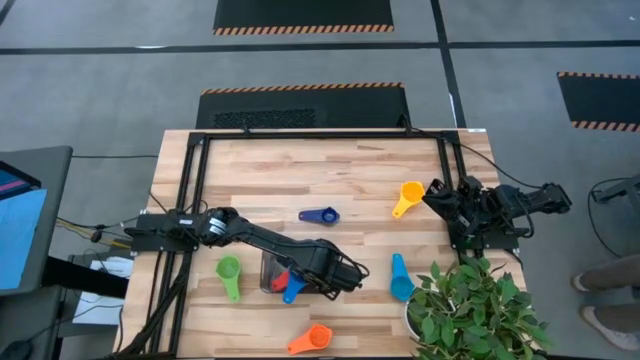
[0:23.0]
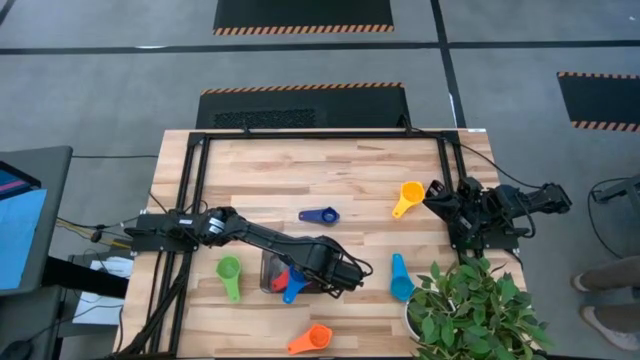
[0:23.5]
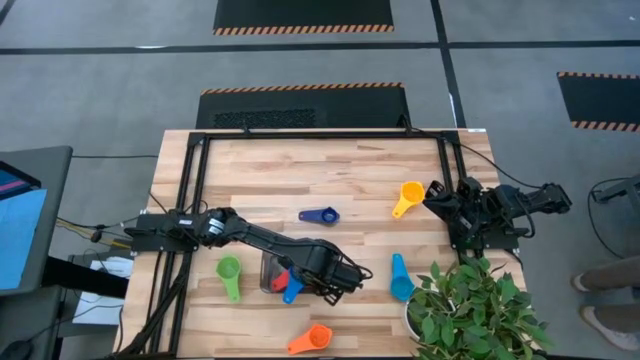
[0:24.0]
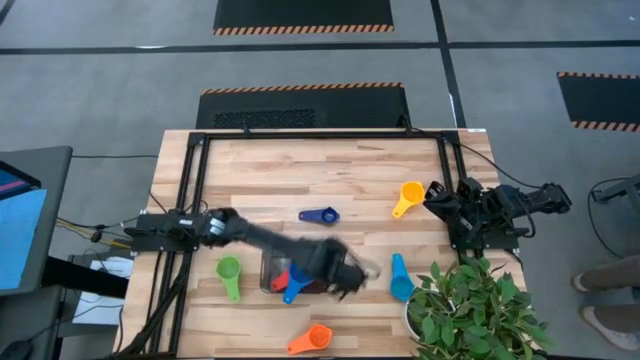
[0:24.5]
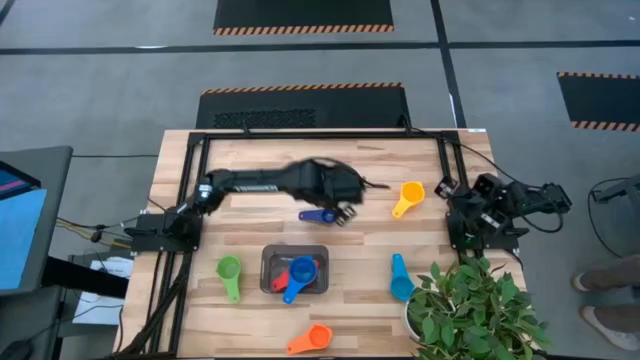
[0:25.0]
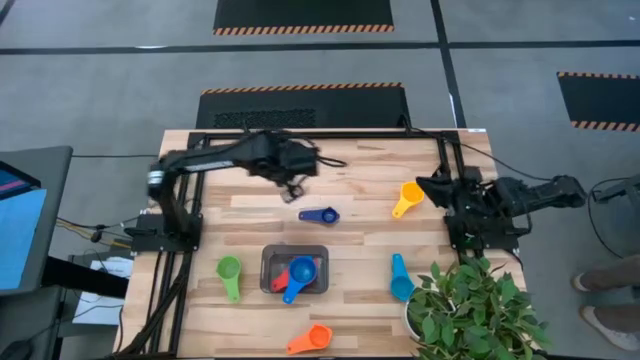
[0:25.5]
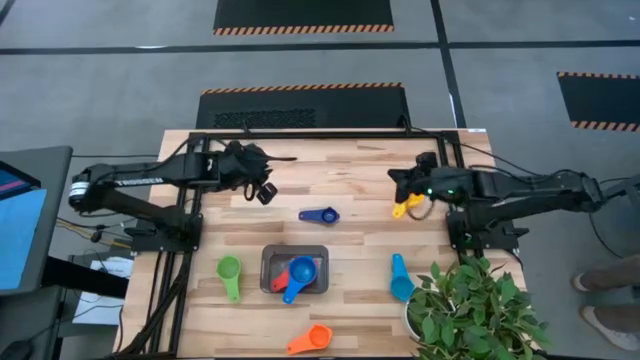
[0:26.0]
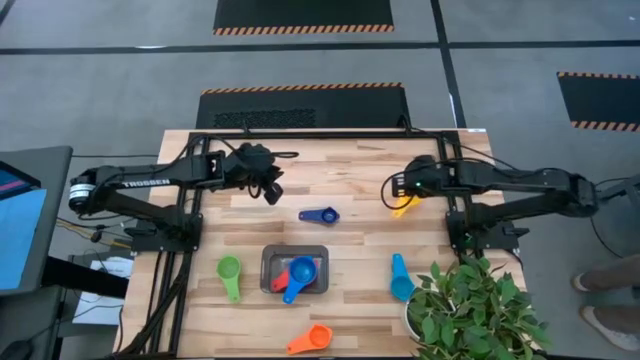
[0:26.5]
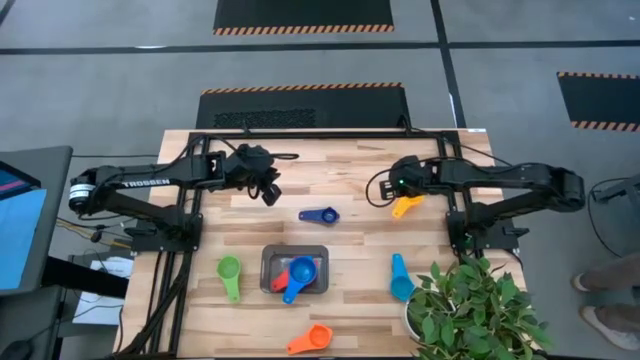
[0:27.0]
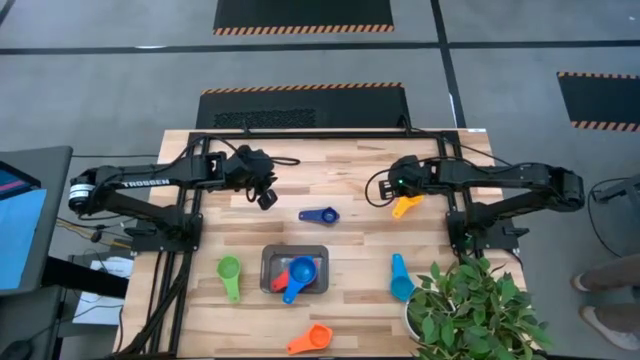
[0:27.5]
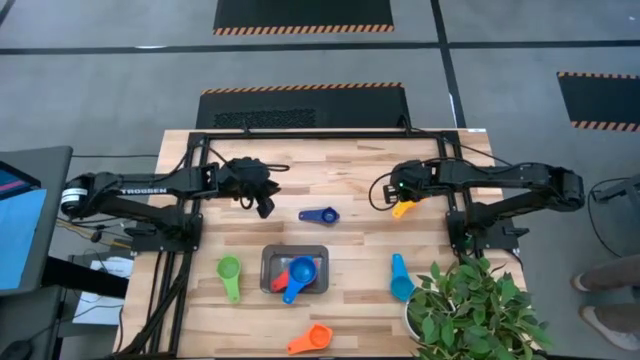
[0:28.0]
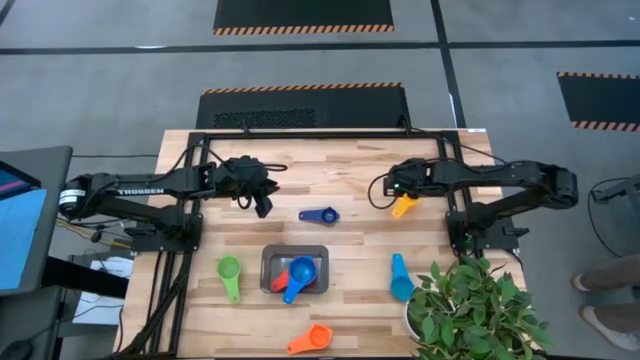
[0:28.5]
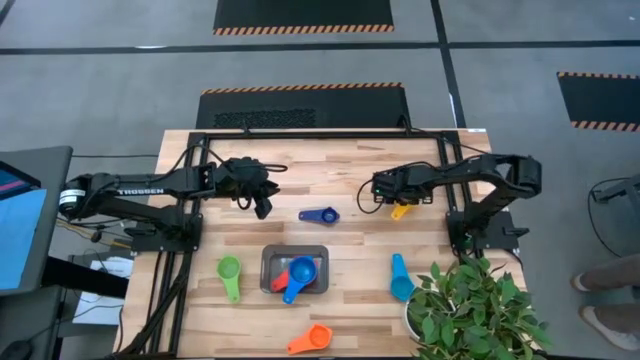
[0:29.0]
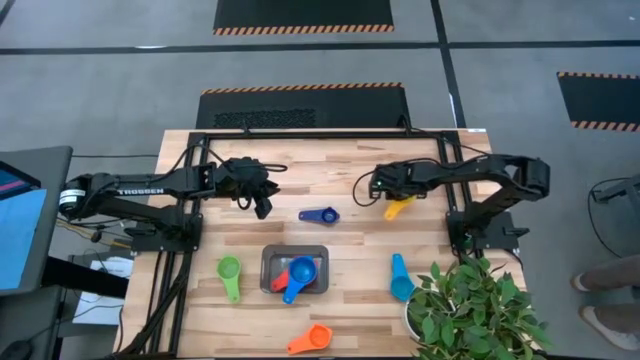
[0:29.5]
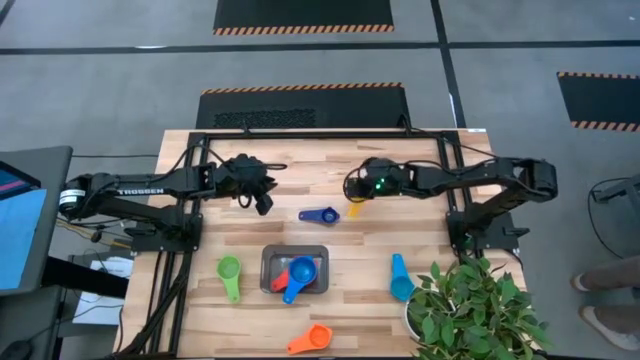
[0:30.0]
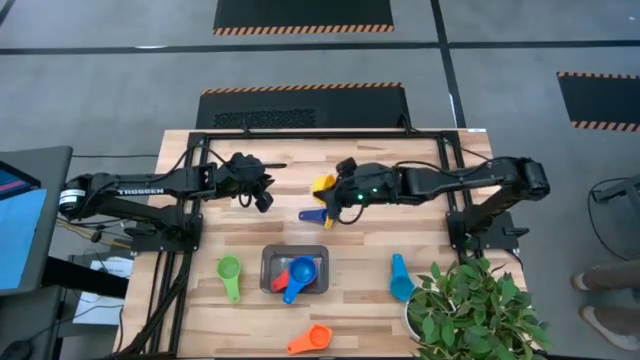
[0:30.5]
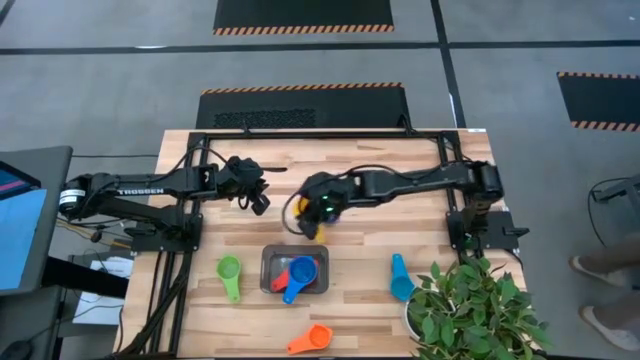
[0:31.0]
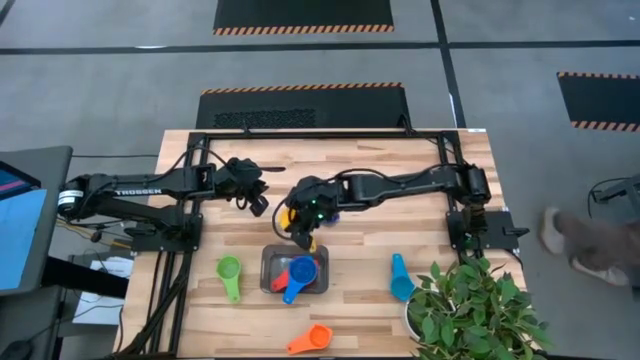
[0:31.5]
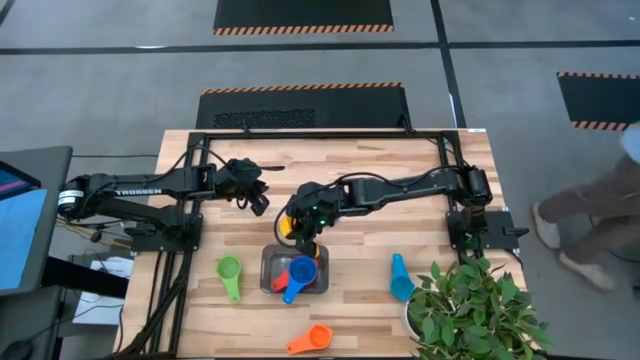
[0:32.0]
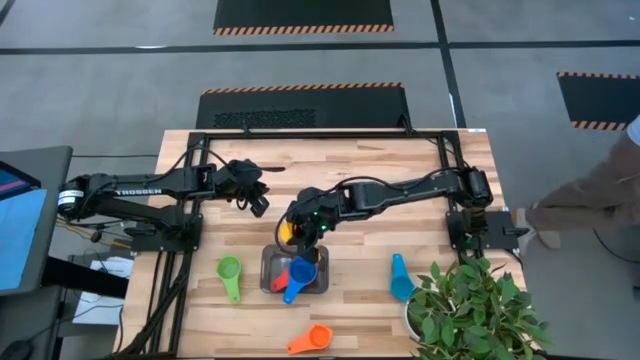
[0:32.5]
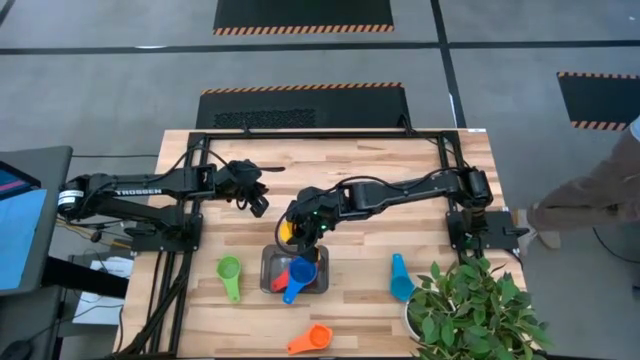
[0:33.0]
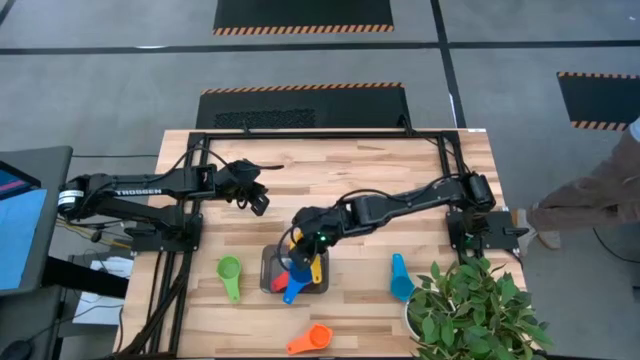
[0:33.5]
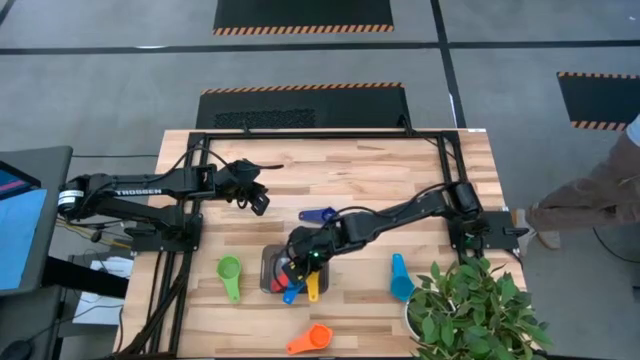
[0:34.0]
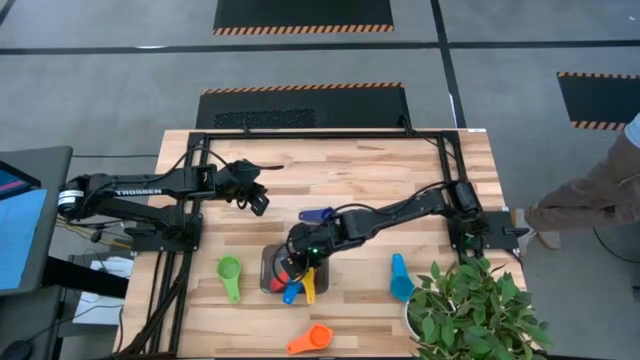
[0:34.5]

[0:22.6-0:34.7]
Task: Nest measuring cups in basket
Stack the yellow measuring cup on top of the blue measuring cup in the bin

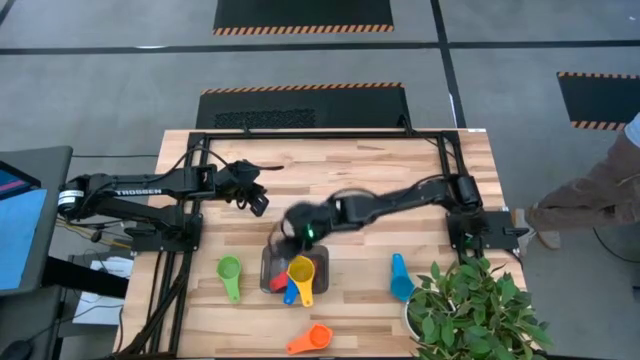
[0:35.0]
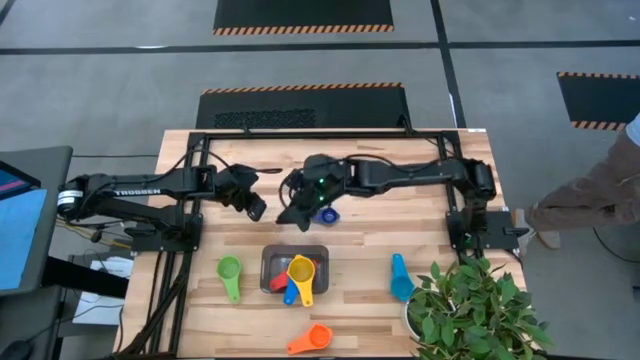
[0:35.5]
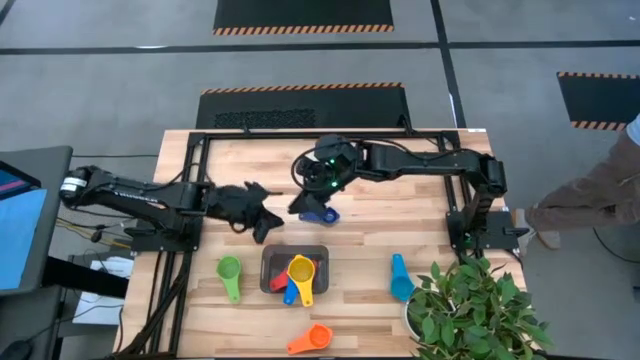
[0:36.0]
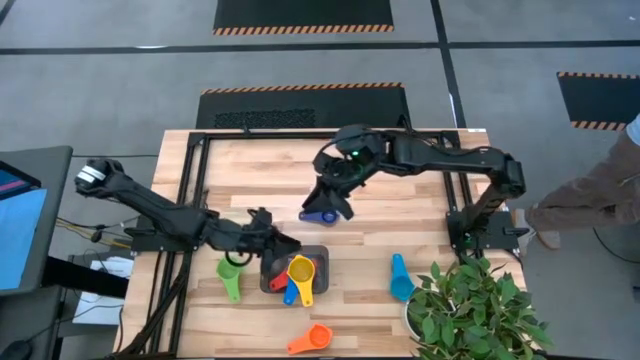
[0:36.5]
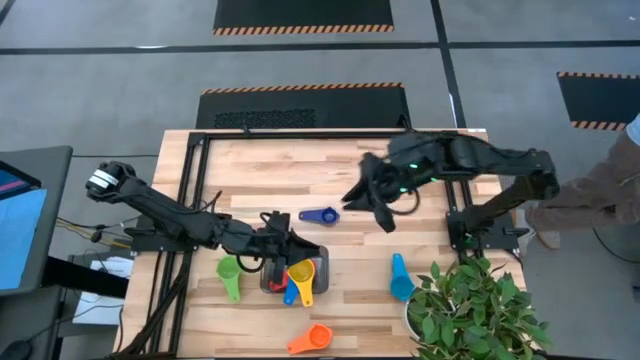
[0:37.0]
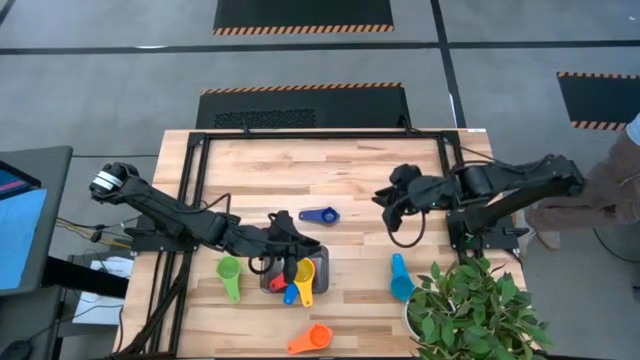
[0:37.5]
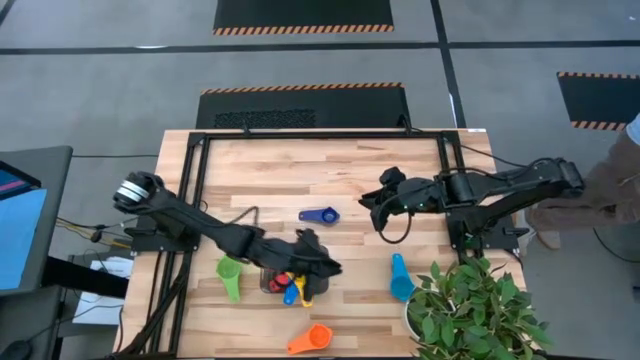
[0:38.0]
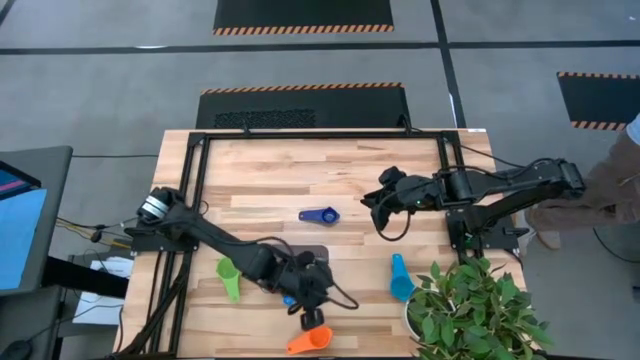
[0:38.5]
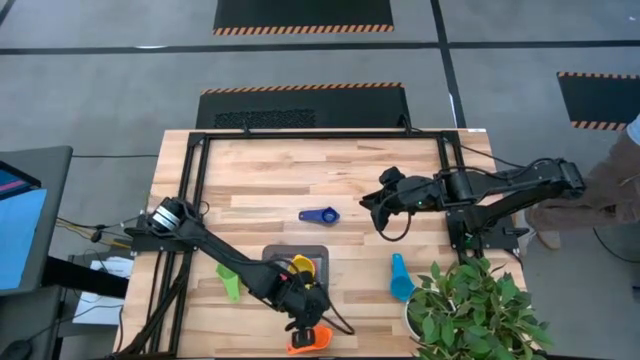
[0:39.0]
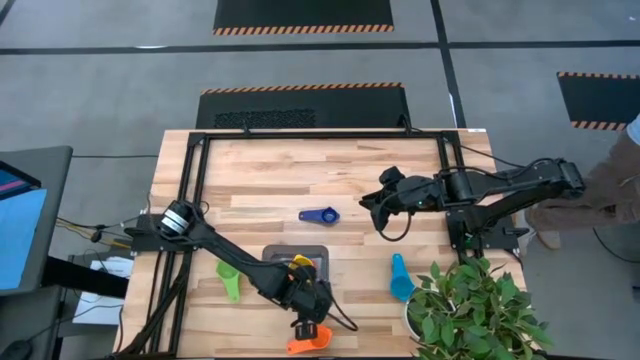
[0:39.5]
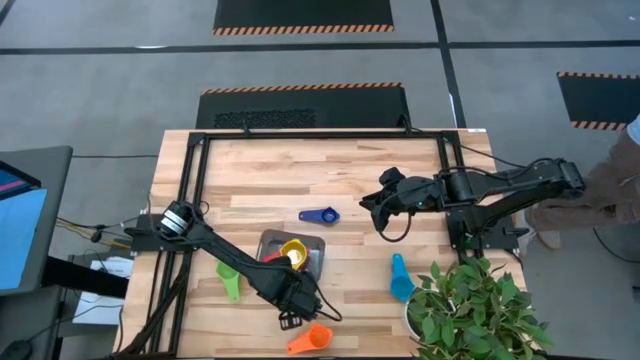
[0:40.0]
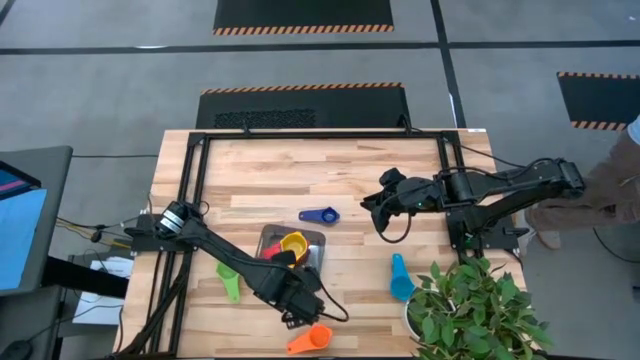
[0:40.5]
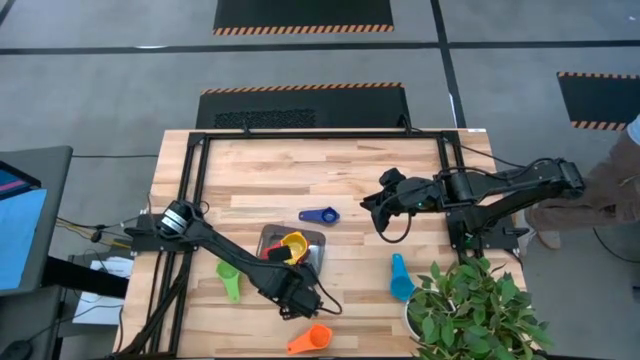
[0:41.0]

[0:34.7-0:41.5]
Adjust the stacked measuring cups in the bin

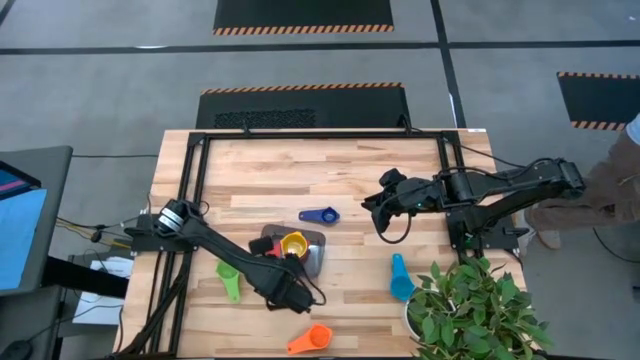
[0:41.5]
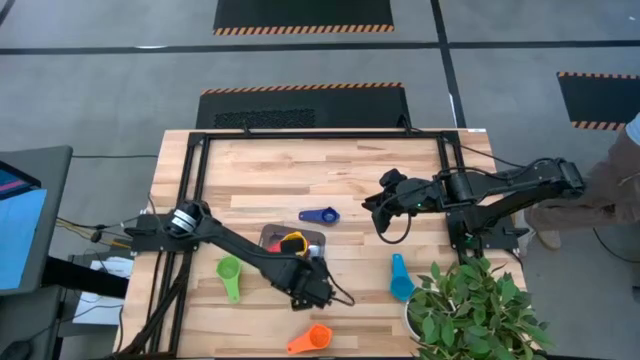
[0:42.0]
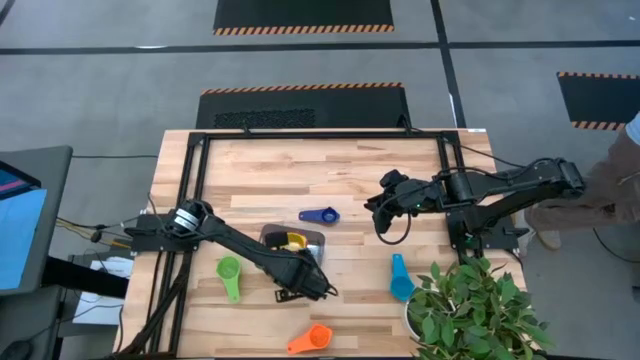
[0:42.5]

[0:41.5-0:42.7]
Adjust the stacked measuring cups in the bin
